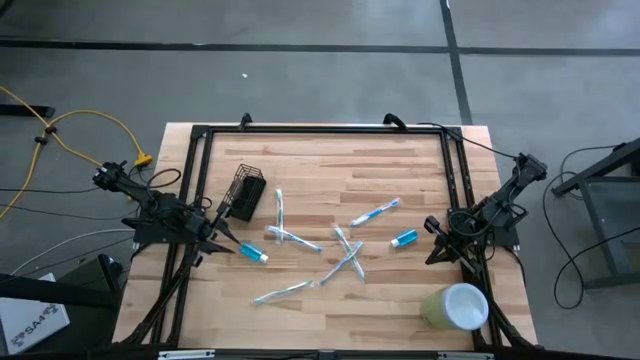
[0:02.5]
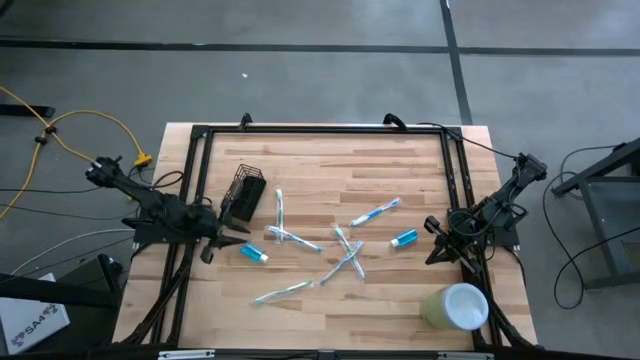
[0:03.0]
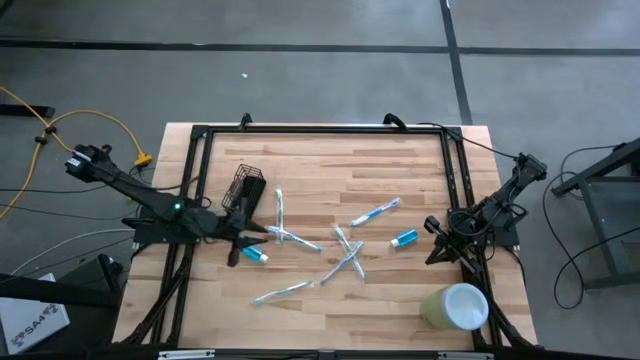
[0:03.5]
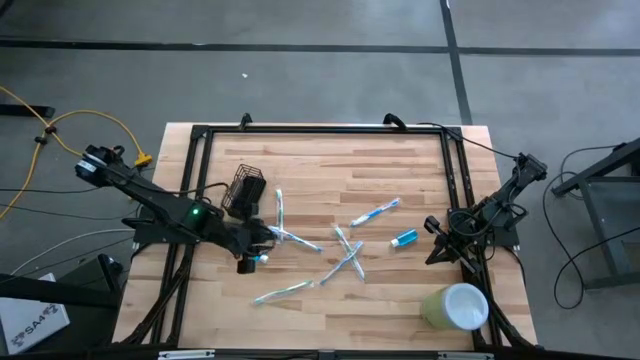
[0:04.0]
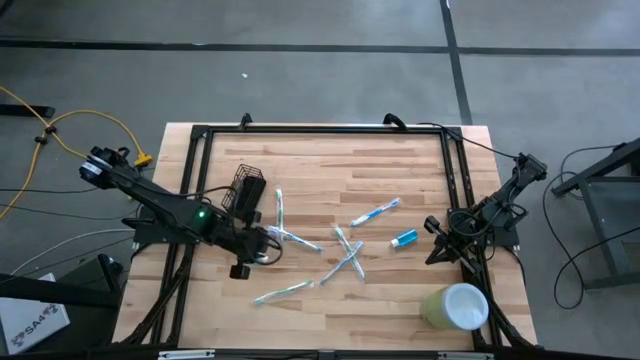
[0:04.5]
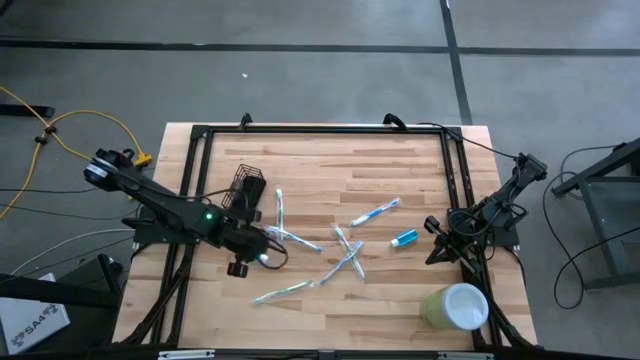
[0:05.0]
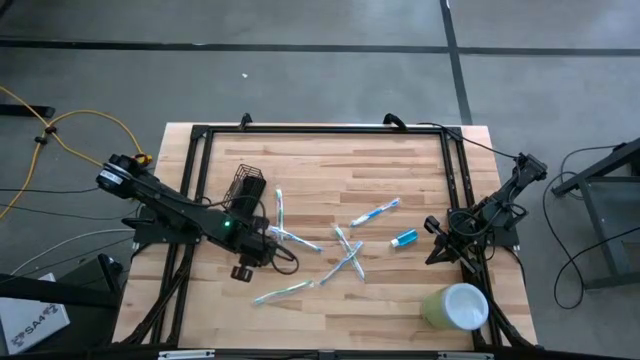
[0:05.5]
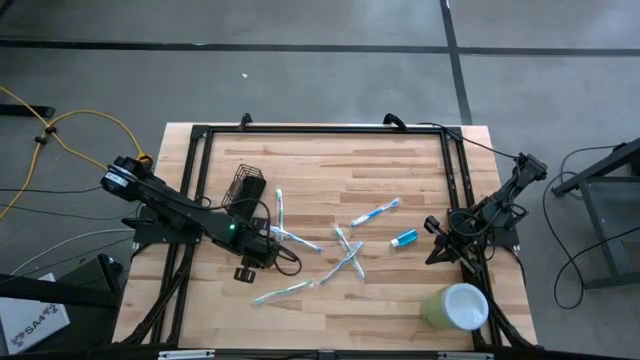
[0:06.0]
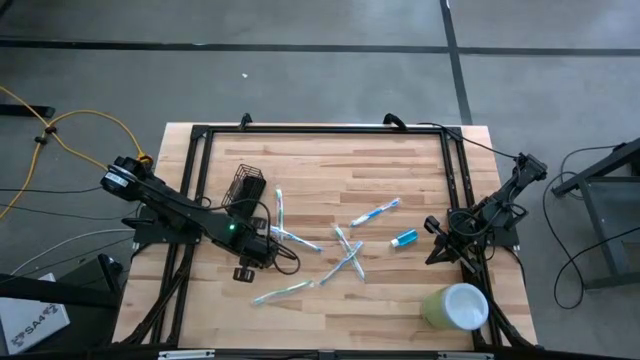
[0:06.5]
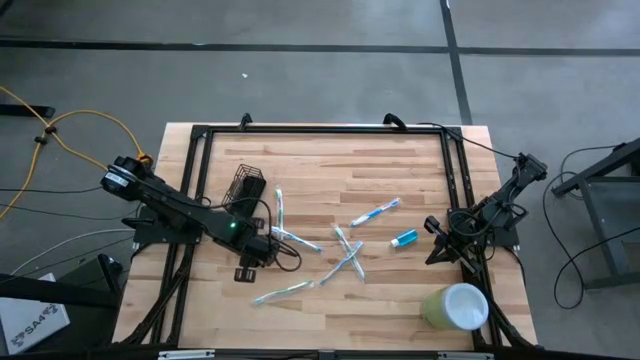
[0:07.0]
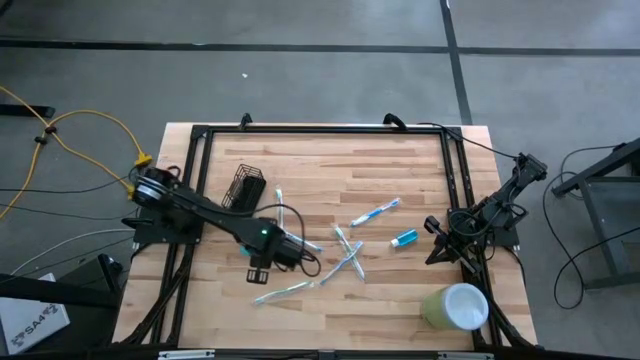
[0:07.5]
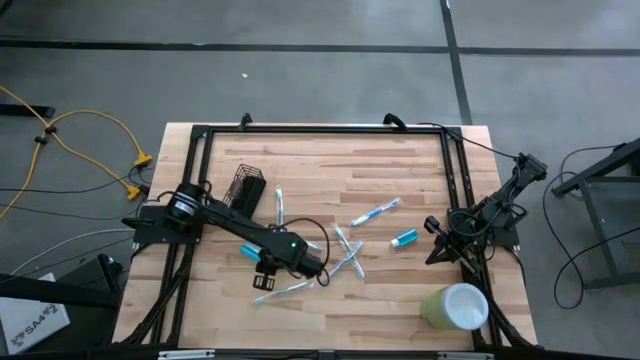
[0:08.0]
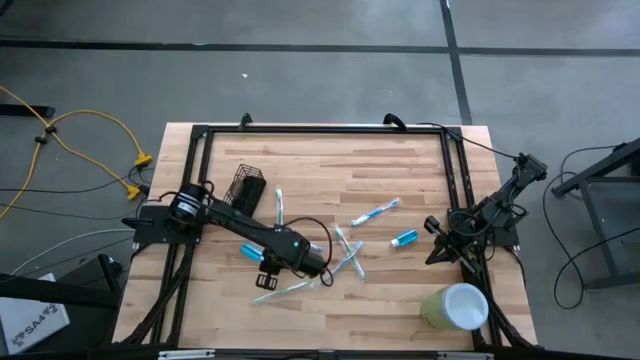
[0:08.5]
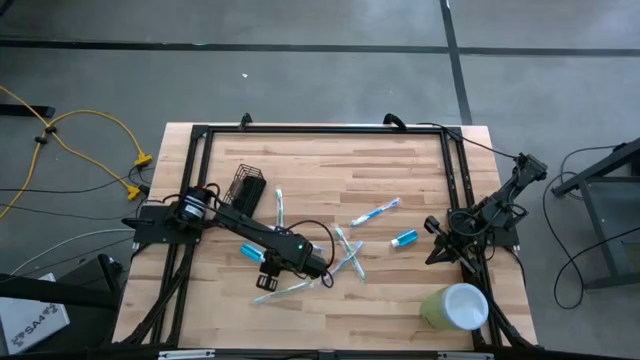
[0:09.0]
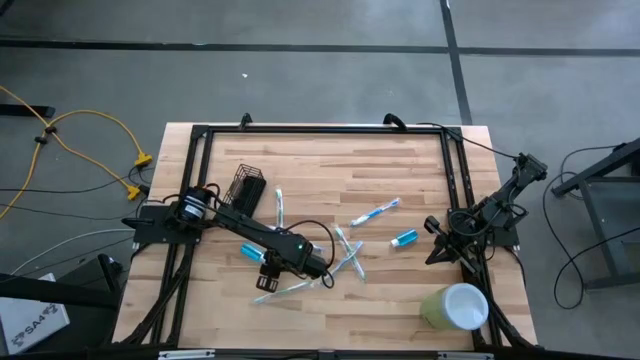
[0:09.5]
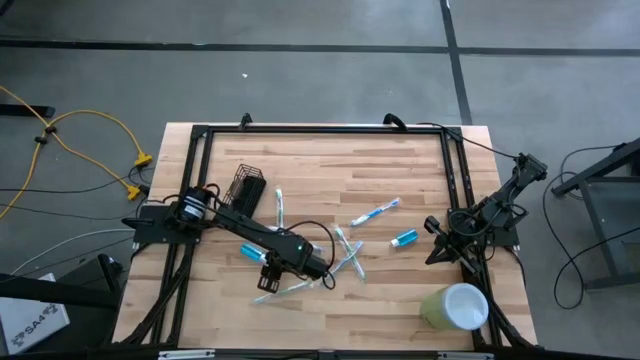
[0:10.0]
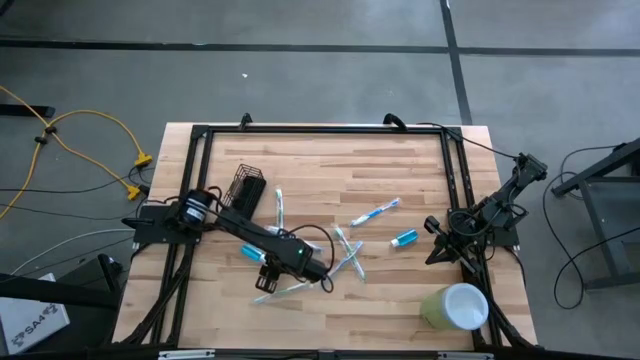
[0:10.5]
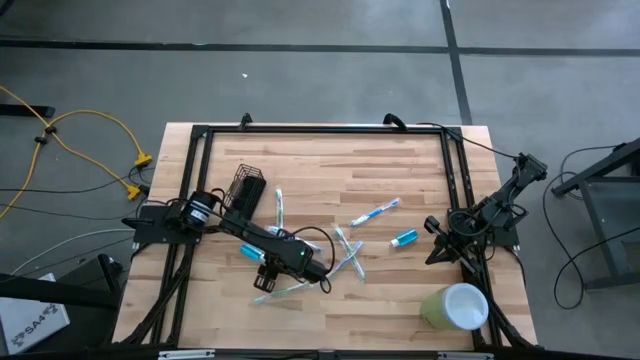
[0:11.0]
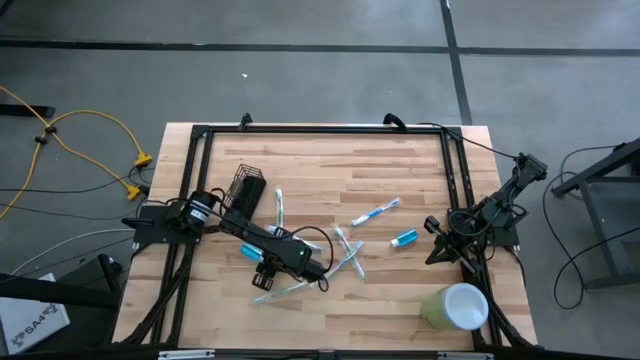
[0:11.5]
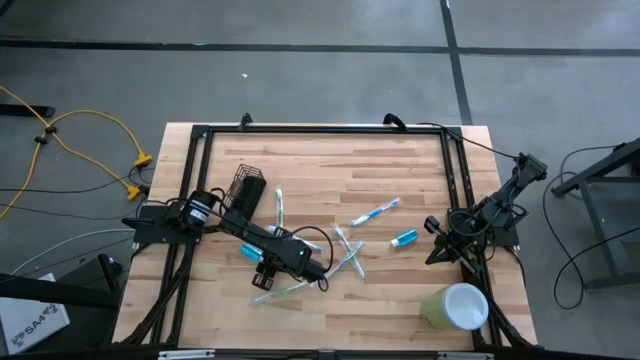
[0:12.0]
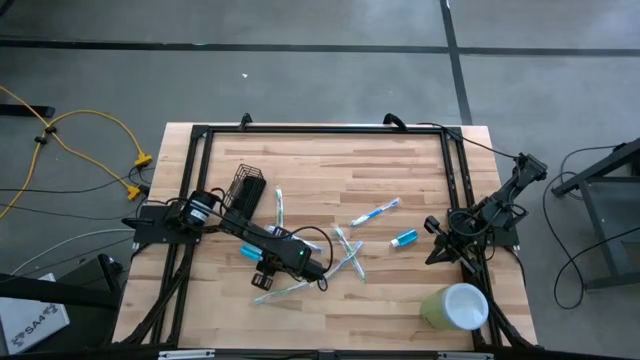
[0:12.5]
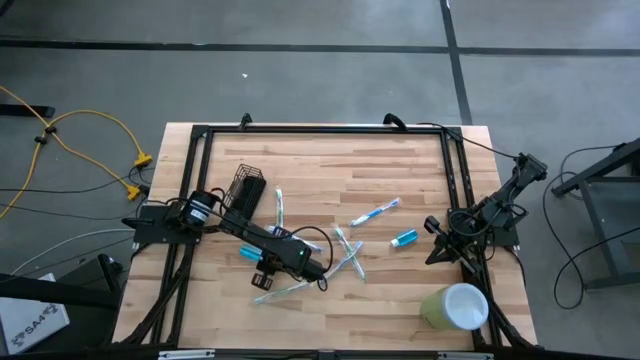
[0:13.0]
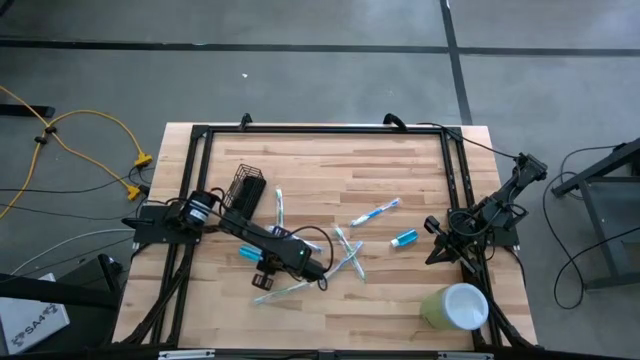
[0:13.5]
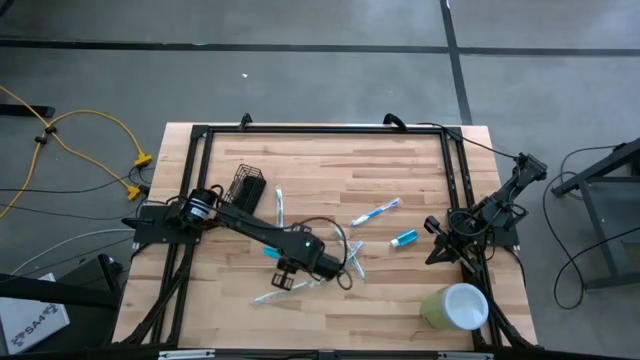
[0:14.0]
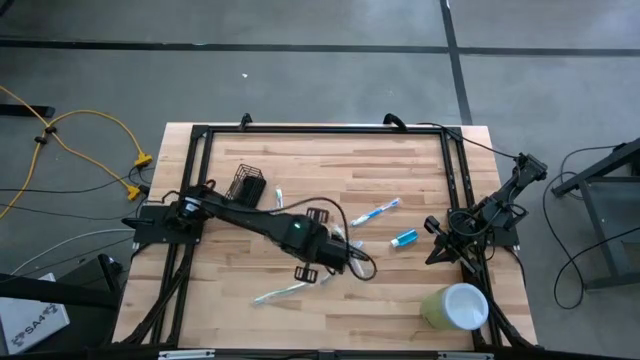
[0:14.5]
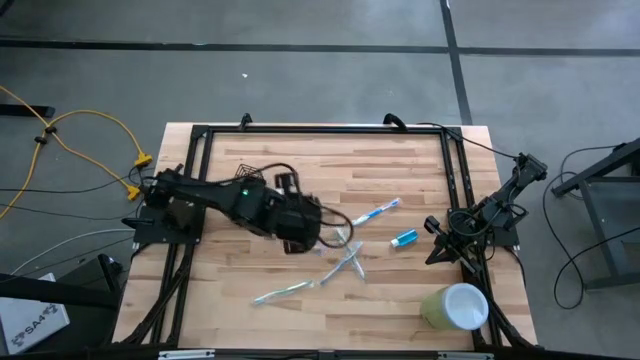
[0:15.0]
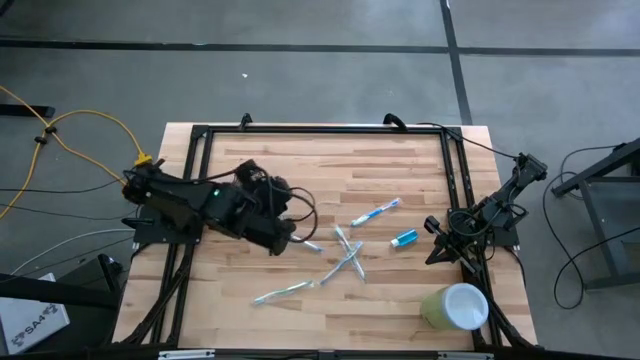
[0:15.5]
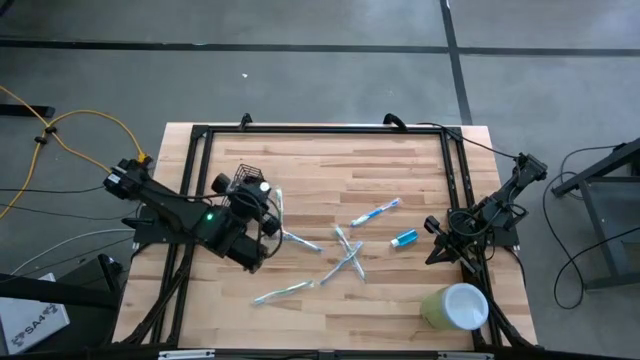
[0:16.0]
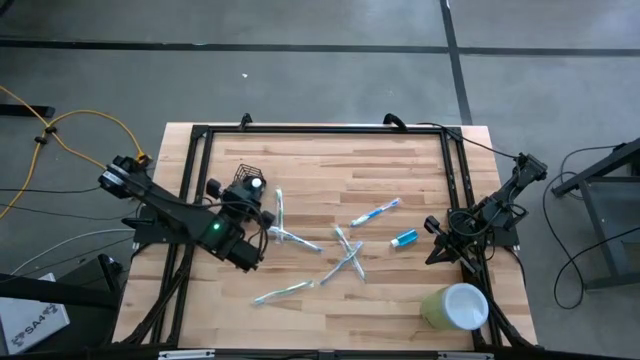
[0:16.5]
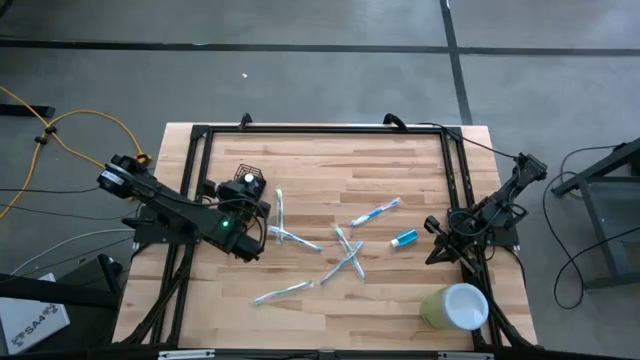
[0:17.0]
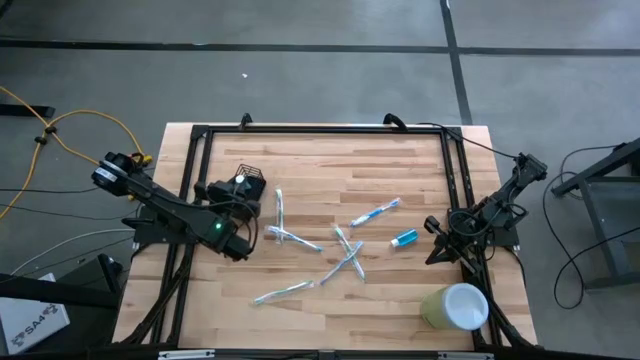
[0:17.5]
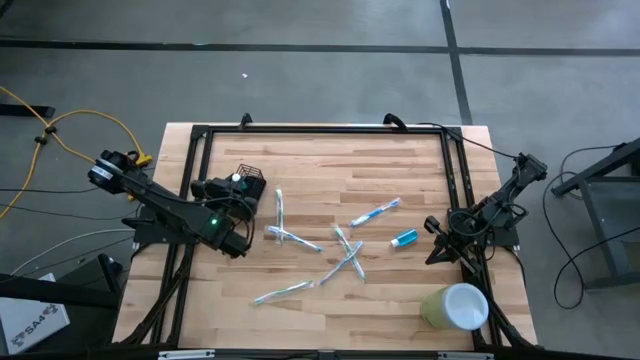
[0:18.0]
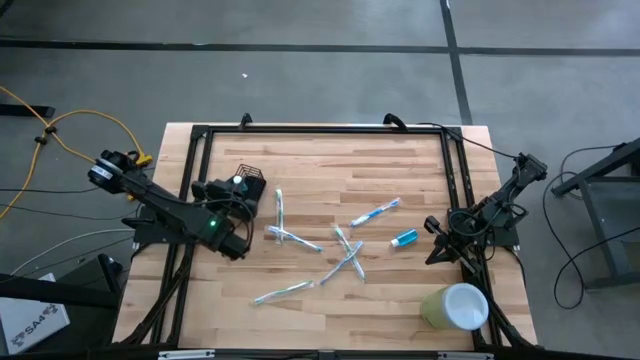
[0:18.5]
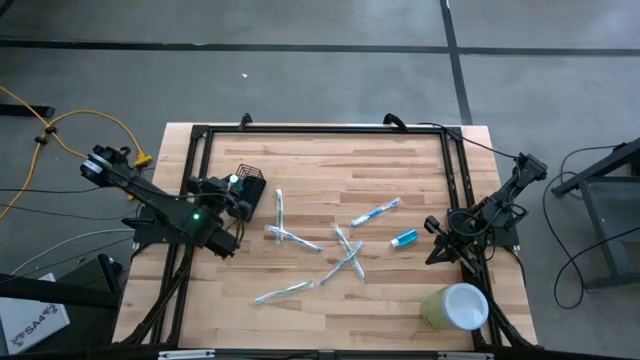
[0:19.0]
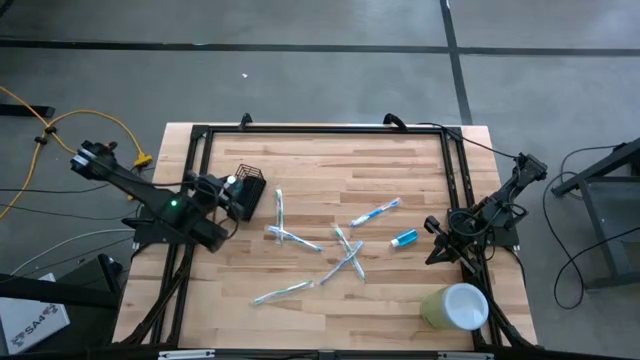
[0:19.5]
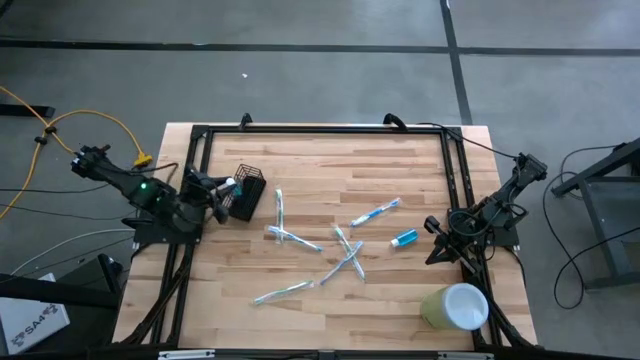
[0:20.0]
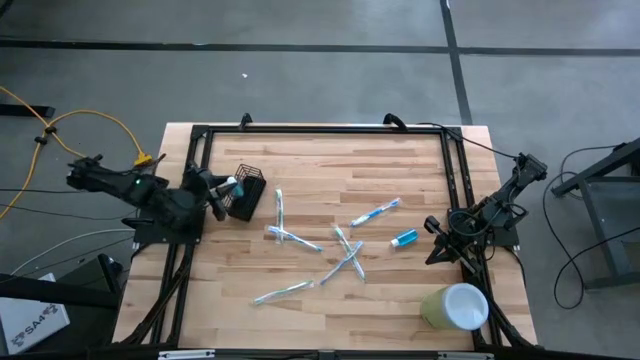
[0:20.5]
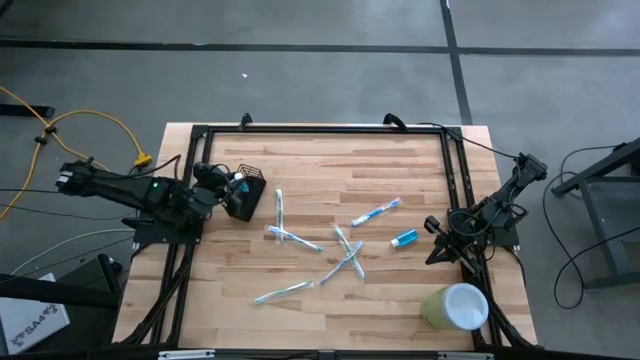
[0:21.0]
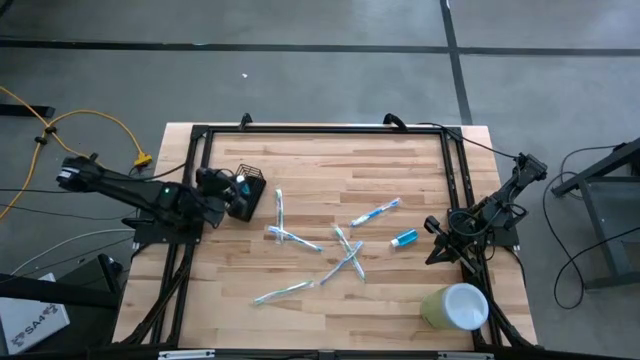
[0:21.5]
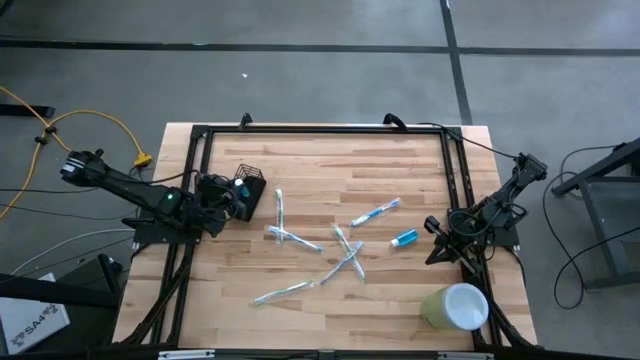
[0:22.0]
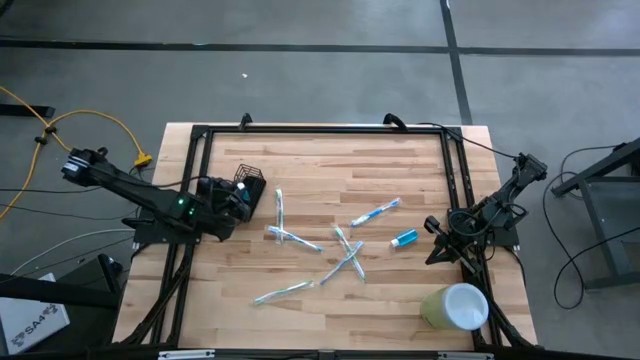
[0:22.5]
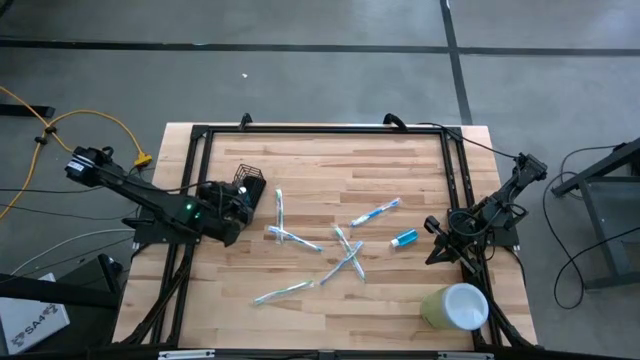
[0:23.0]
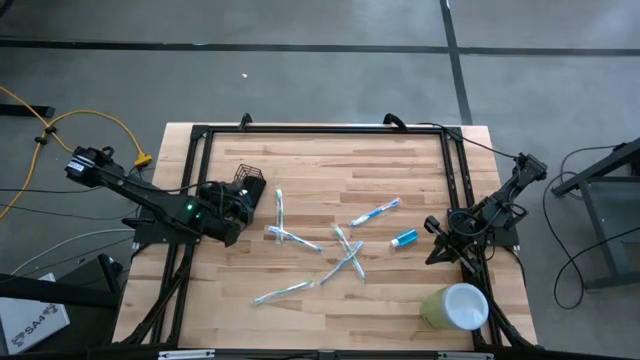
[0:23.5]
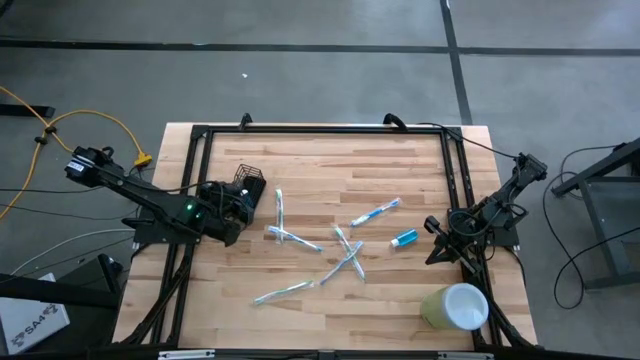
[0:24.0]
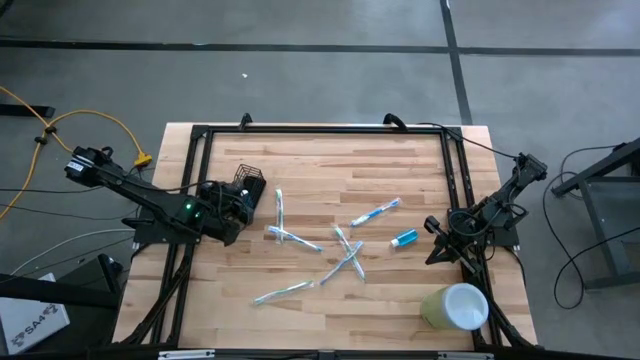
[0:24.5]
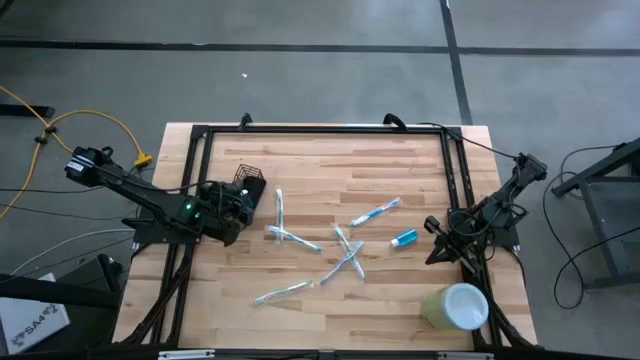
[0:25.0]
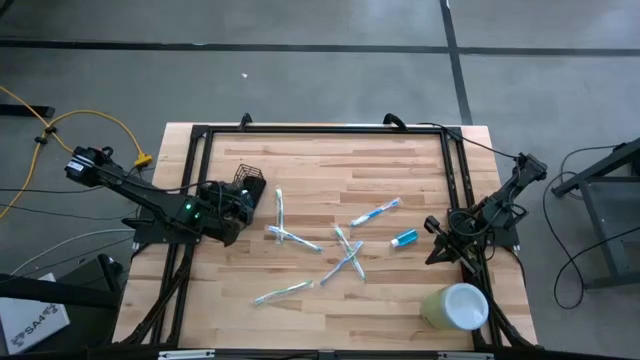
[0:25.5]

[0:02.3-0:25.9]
Task: Pick & Place toothbrushing station
Put the left blue mouthwash bottle into the black wire organizer
